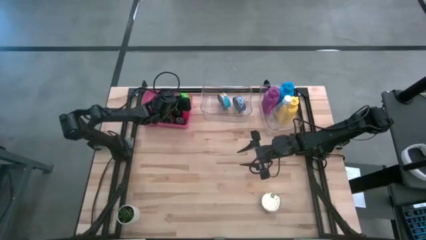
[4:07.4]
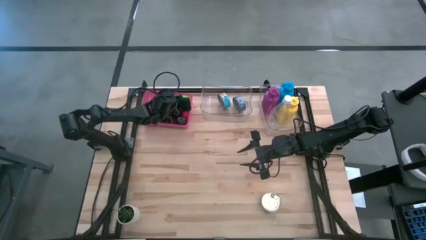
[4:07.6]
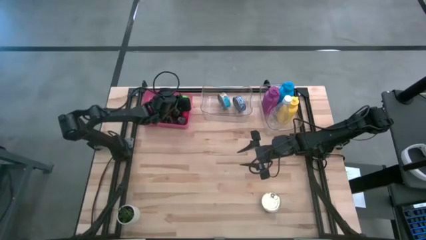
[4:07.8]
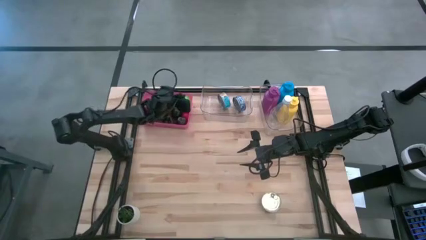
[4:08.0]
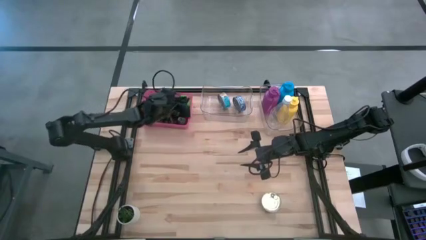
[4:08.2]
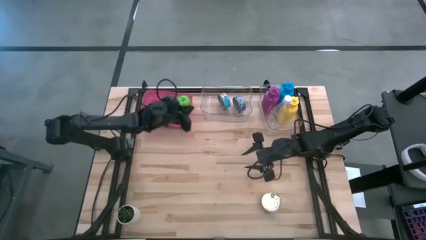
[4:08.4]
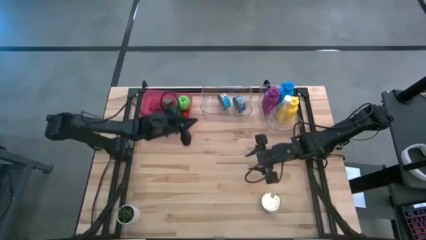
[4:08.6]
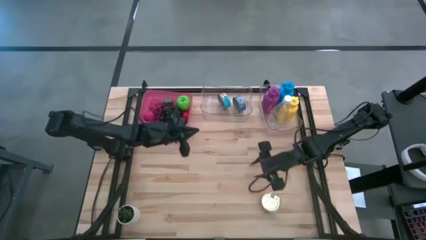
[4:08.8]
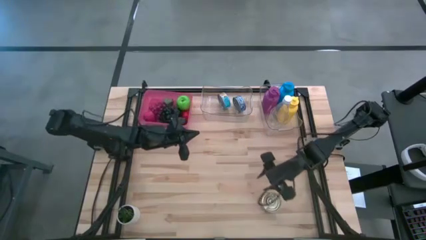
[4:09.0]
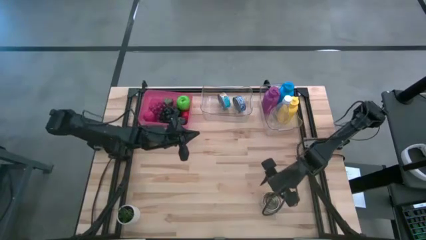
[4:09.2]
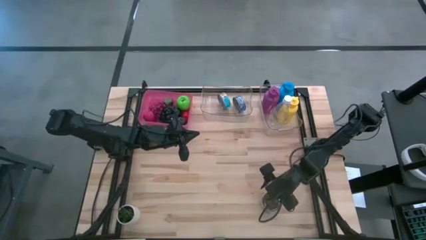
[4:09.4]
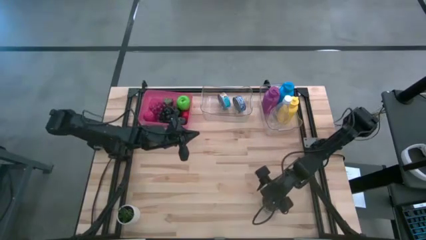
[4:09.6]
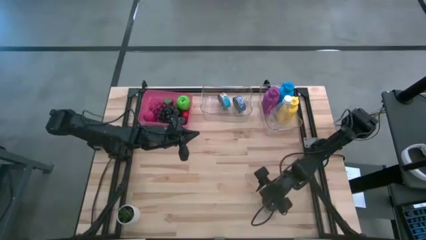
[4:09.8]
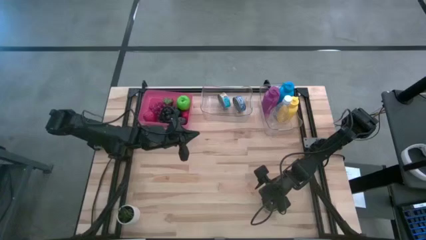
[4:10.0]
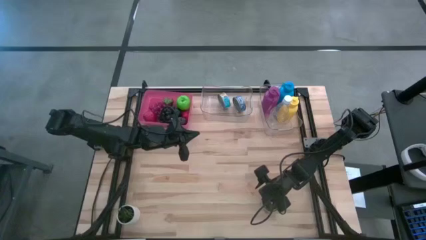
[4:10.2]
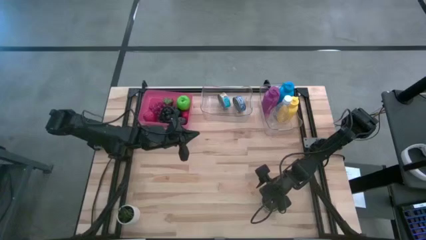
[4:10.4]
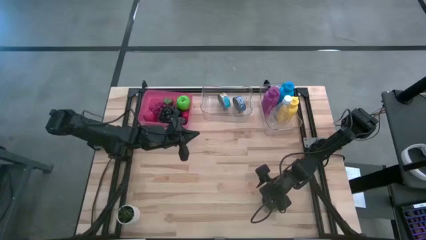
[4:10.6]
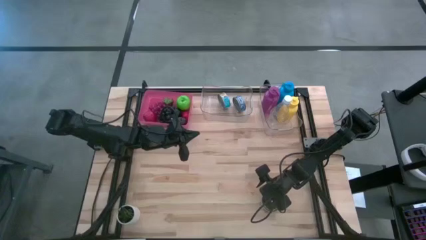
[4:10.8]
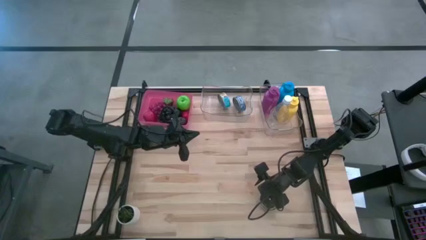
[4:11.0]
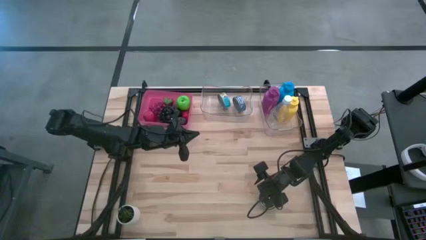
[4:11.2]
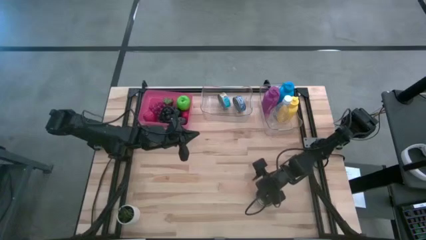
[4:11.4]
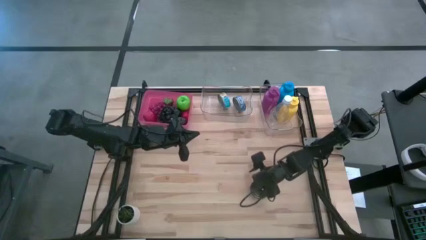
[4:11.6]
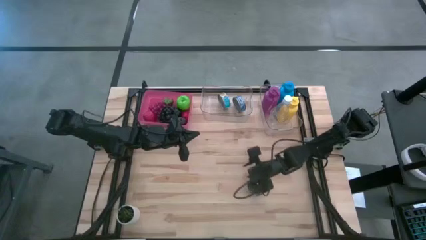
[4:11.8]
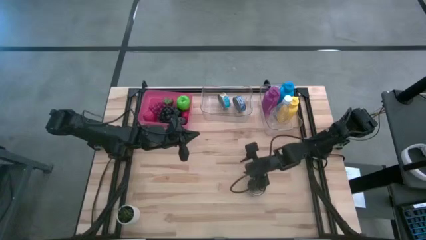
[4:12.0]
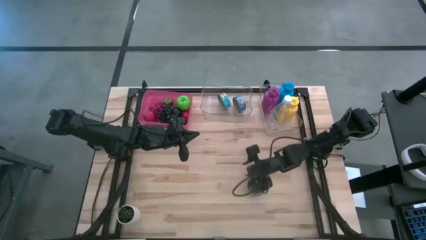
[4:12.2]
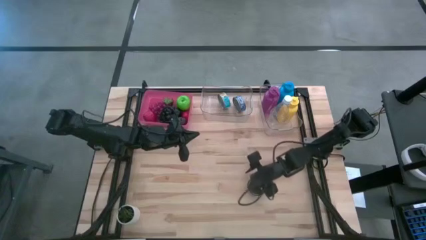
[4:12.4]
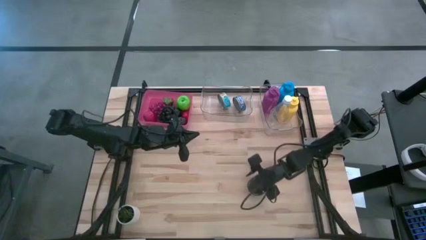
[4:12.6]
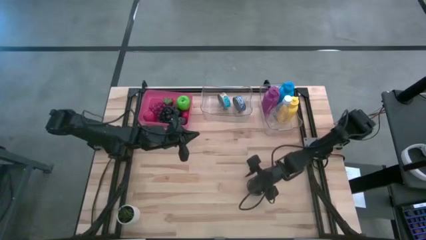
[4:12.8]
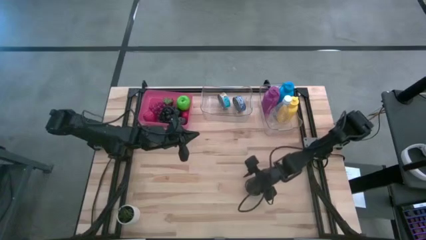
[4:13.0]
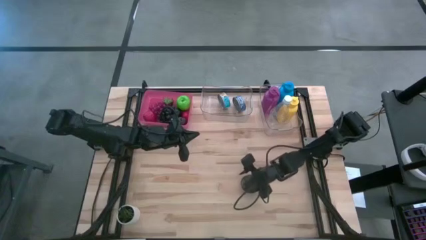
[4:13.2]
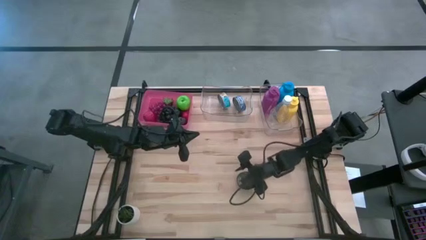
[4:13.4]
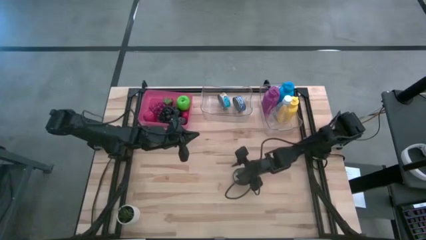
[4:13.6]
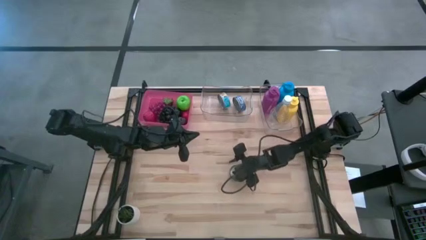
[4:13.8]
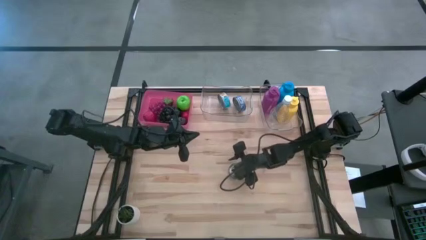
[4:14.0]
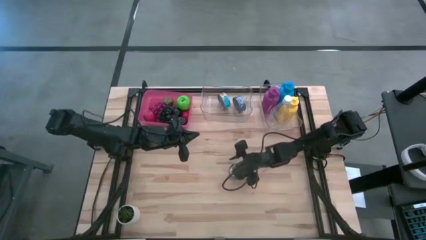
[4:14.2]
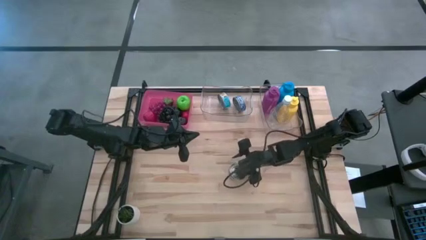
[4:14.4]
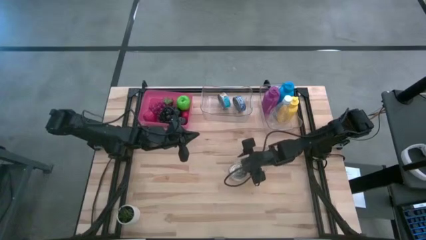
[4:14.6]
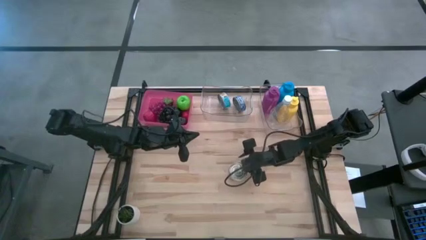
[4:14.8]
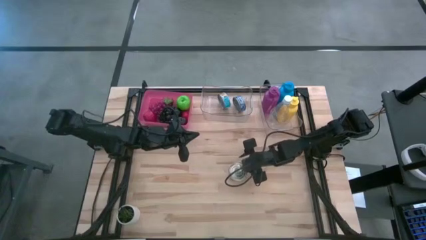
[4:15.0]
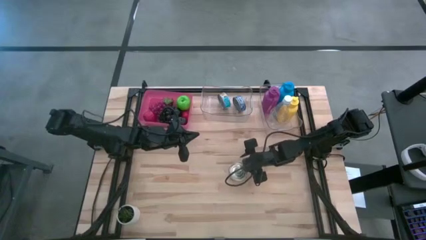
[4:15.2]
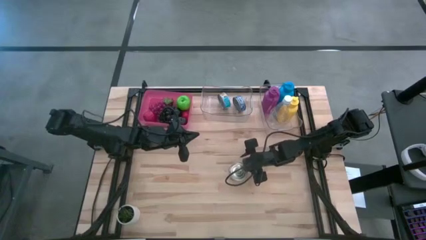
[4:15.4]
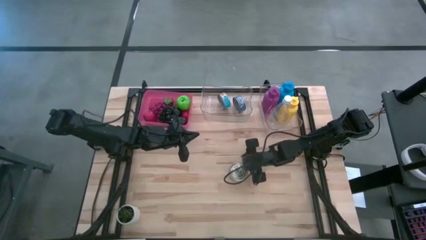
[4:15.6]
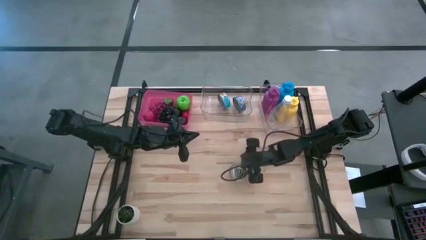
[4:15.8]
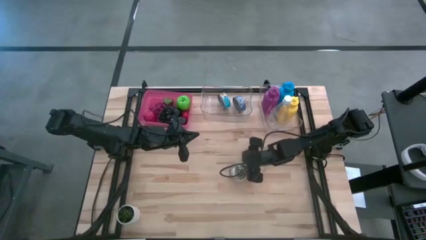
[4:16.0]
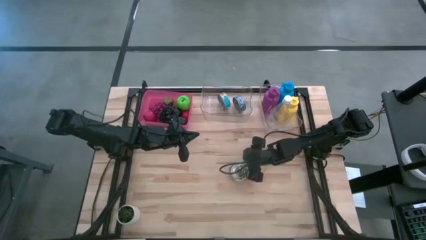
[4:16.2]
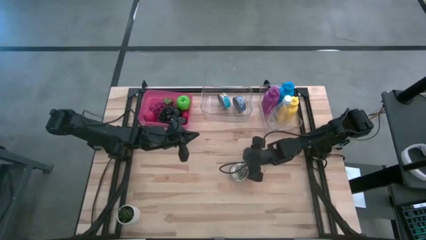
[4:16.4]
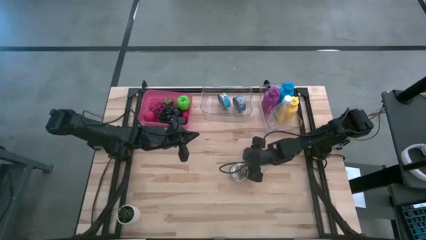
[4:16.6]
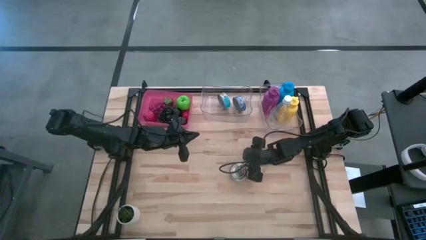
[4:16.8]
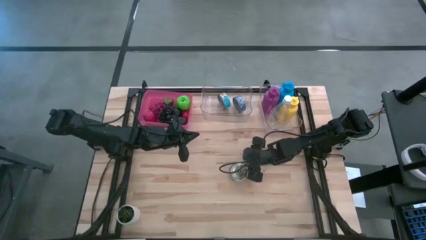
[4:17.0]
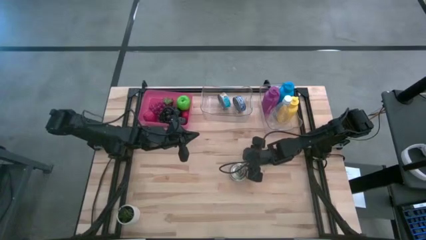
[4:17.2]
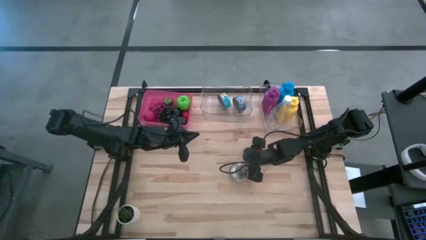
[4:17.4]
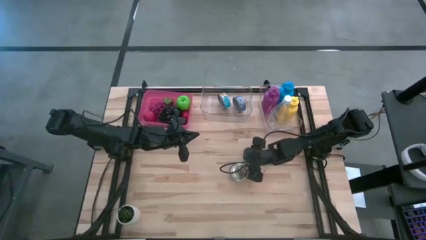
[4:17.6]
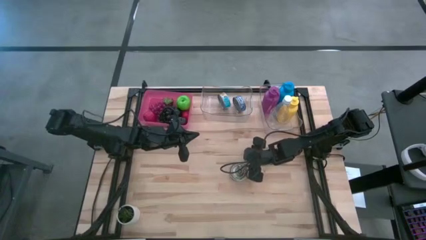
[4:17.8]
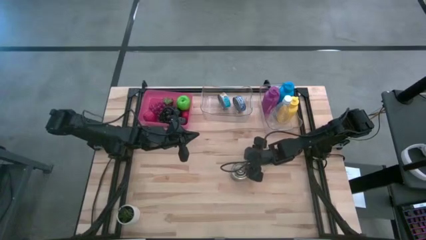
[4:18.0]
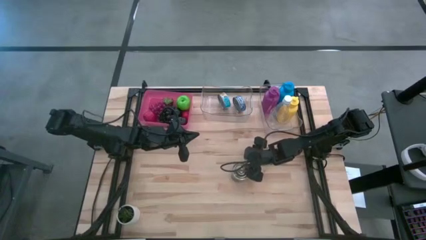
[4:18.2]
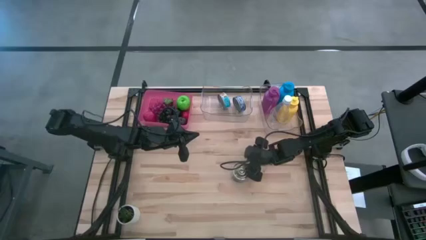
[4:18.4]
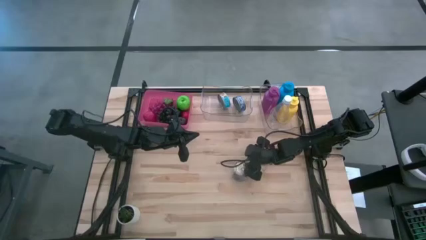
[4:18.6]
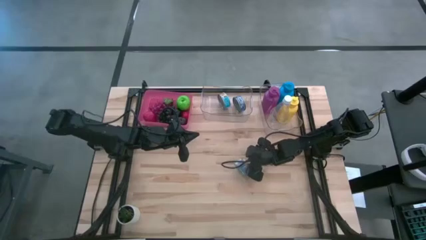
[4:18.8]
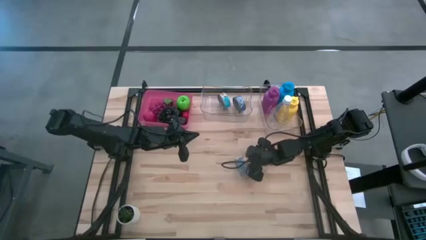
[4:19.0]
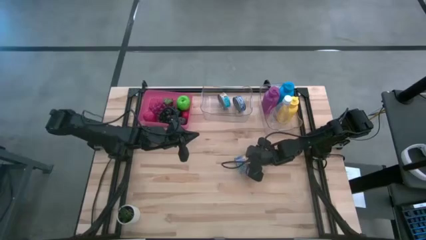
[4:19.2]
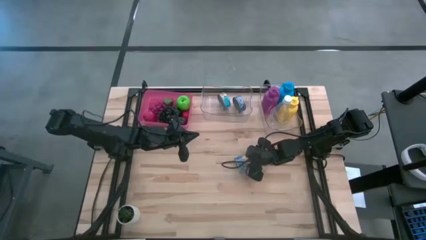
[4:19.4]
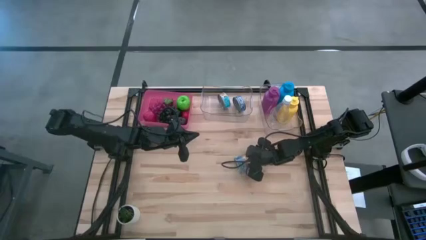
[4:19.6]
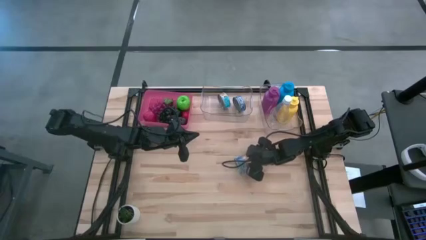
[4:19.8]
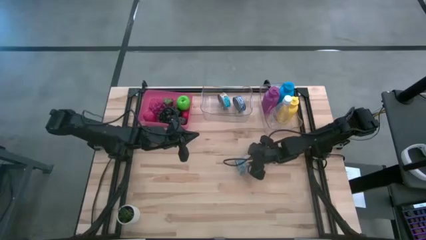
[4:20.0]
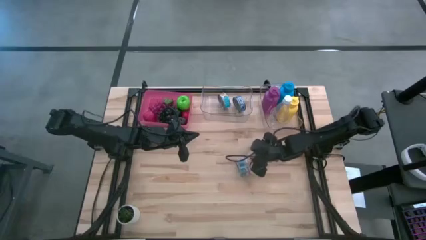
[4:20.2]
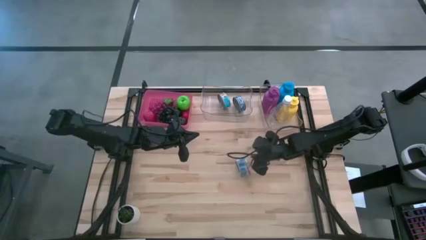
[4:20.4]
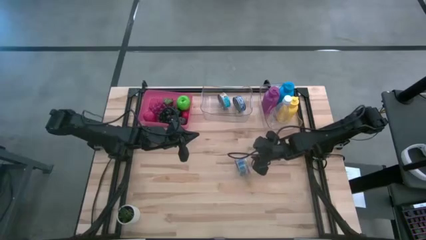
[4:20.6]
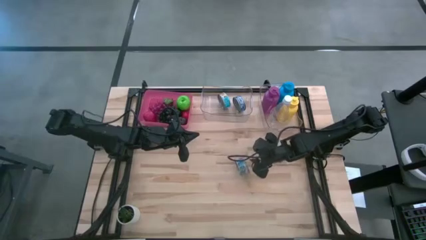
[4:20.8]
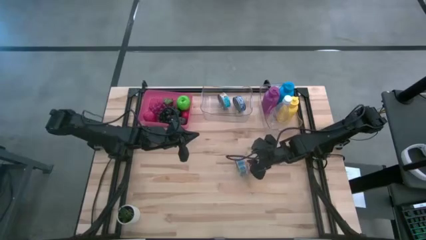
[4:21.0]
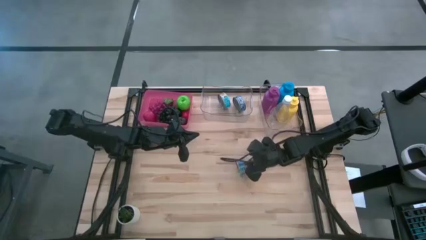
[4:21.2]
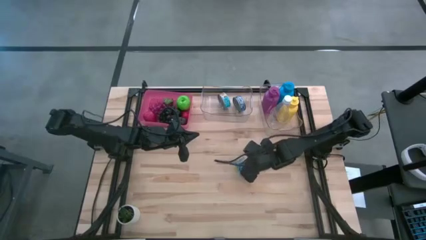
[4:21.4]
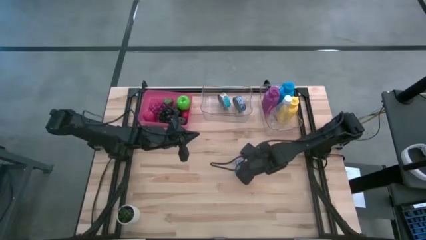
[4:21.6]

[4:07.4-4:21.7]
Task: Pick & Place Food Item
Put the blue pink tuna can into the left transparent bin

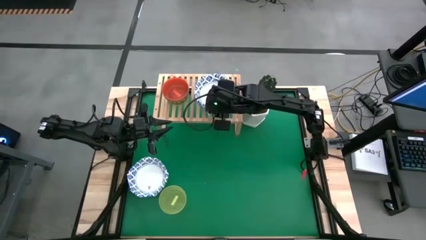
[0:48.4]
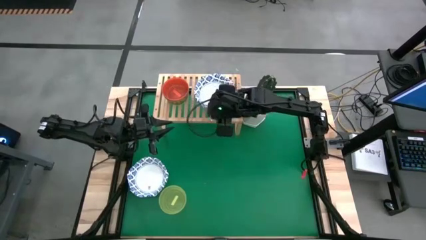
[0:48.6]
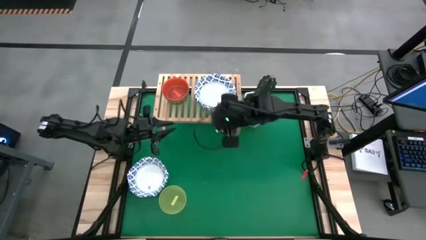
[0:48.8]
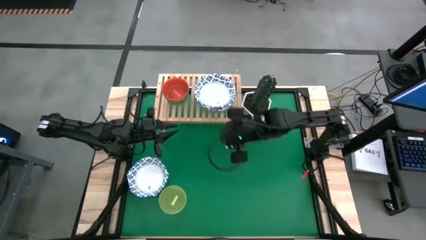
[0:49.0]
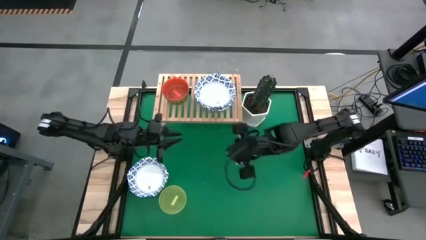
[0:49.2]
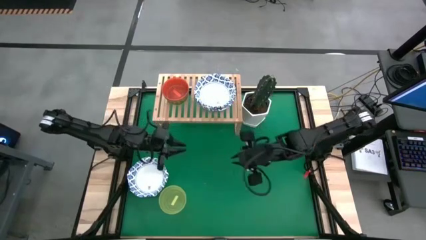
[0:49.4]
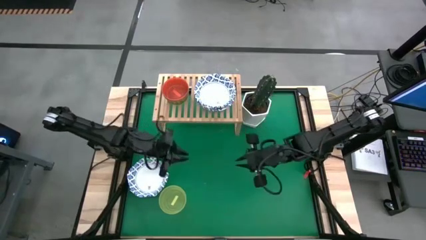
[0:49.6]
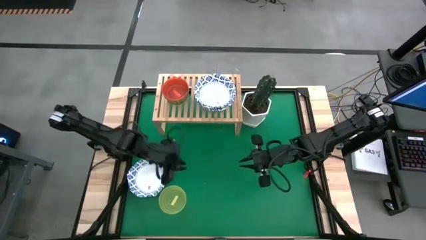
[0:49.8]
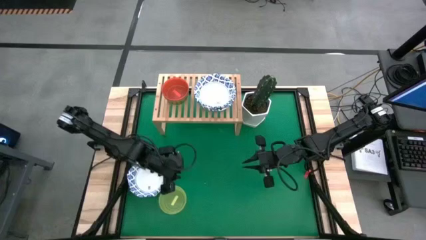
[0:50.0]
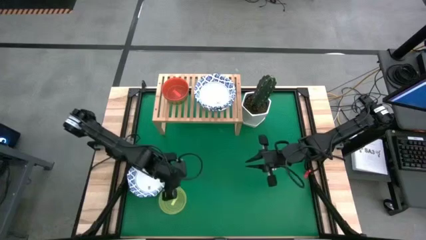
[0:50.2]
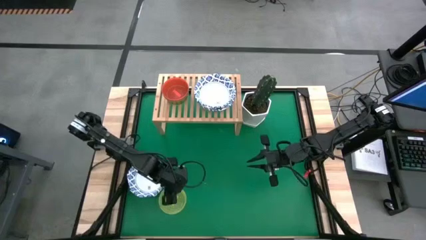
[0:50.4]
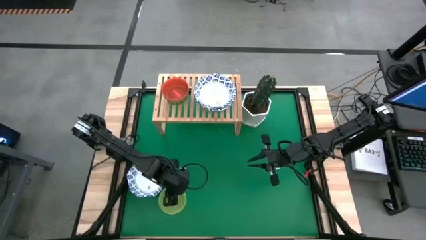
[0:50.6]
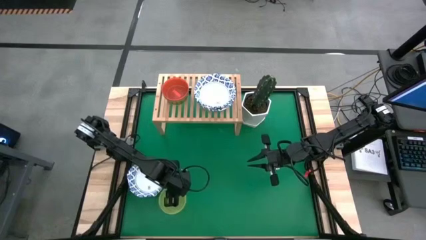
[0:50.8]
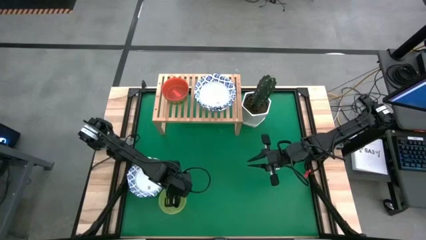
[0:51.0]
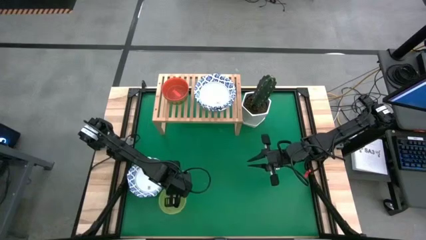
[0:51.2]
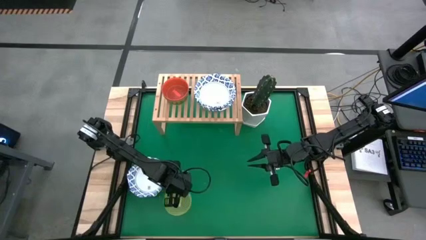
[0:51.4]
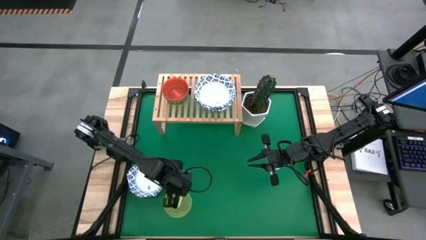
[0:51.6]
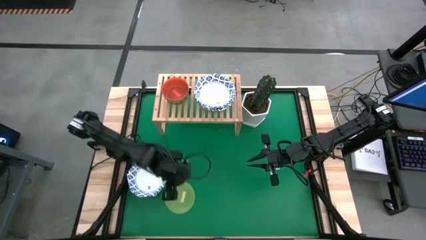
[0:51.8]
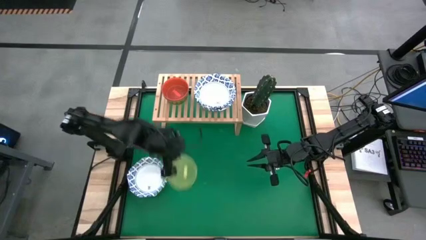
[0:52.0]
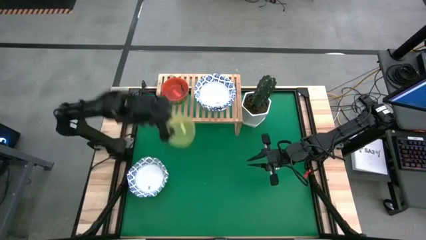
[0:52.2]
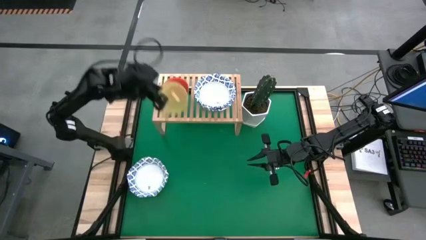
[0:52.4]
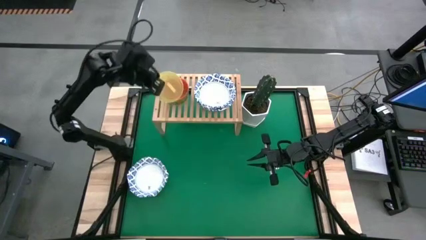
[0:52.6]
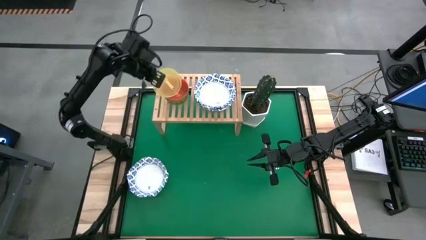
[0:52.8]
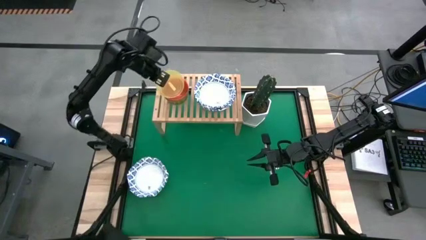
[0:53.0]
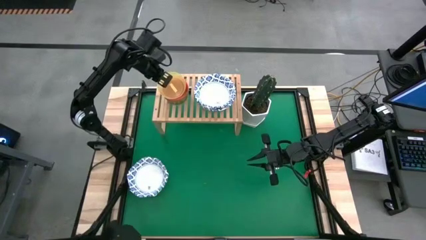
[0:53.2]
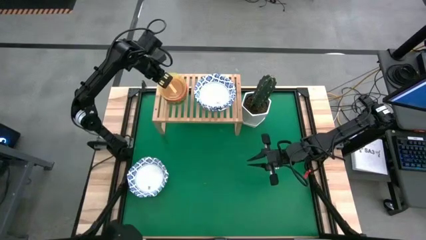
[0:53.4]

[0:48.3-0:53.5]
Task: Place and stack bowls onto a shelf
Stack the yellow bowl on top of the orange bowl on the shelf
